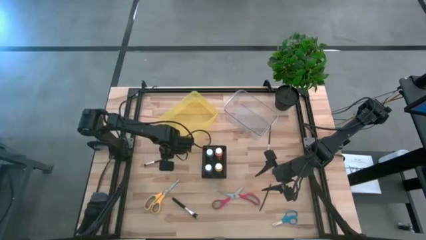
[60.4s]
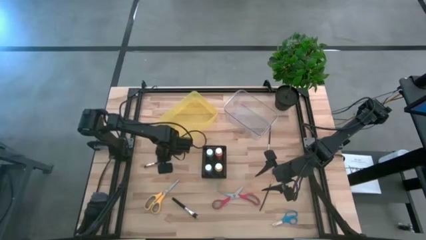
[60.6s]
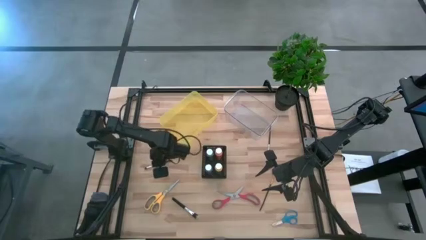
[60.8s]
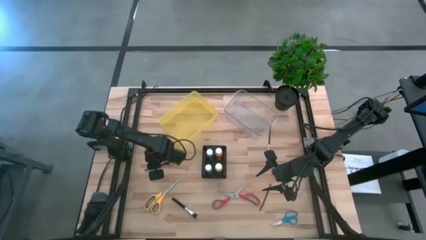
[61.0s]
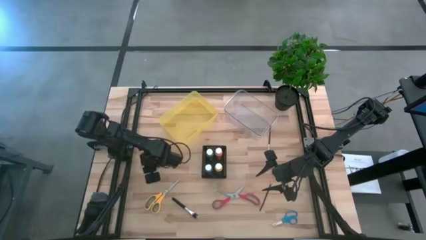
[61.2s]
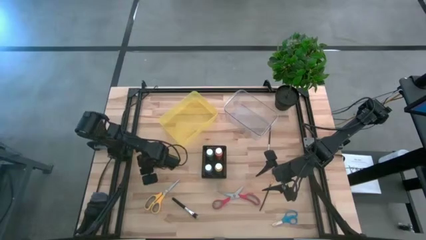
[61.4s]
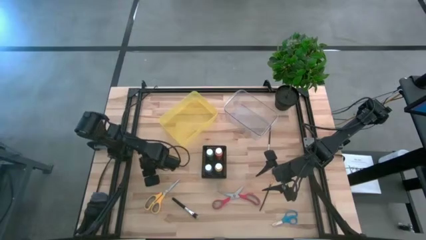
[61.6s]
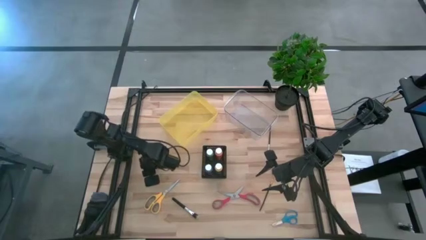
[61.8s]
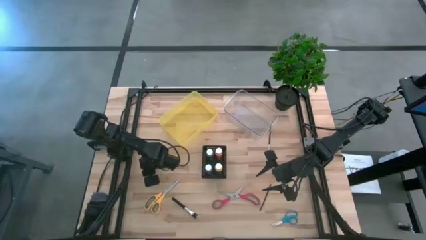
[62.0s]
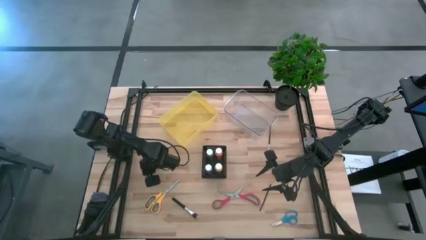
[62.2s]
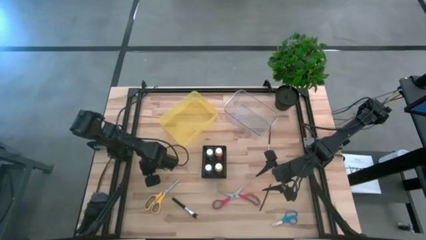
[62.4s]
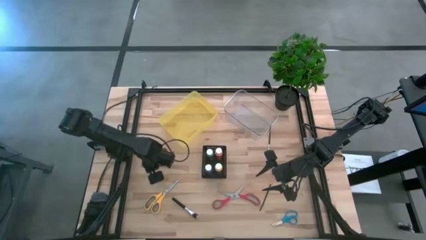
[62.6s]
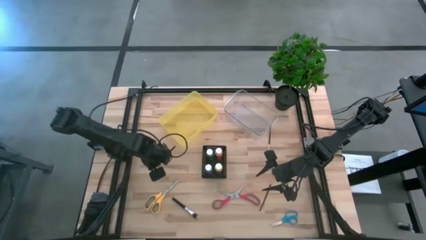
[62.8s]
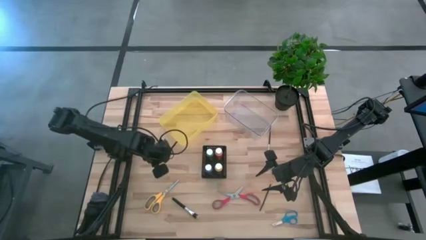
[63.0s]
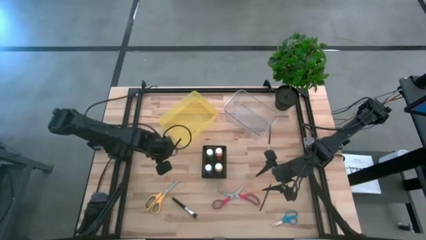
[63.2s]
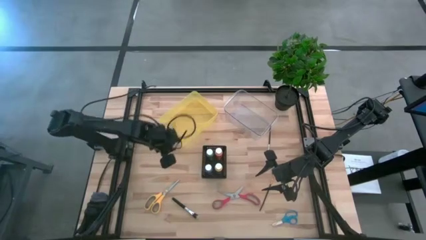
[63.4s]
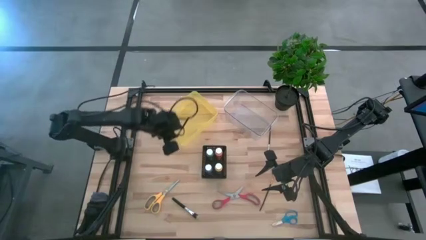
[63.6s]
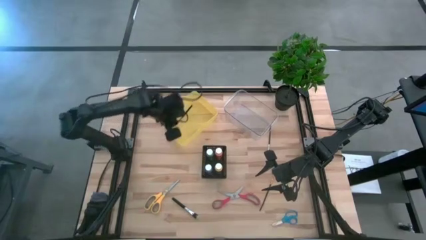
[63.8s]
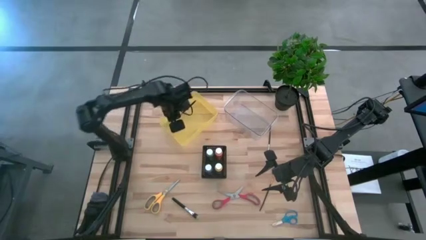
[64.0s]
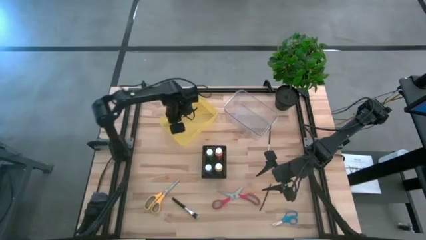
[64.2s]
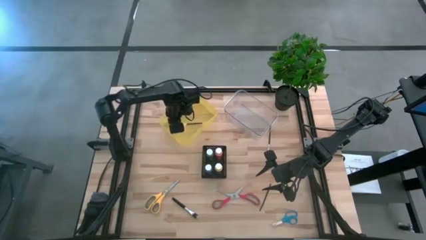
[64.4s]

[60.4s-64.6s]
Task: Pick & Place Paint Supplies
Put the left black eyeshadow brush into the yellow bin

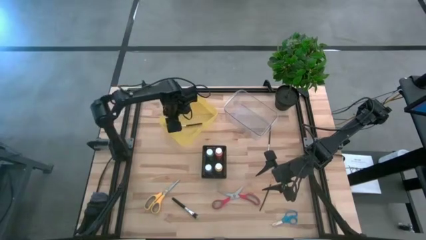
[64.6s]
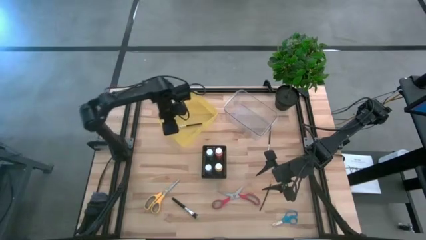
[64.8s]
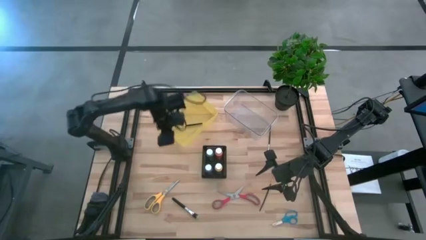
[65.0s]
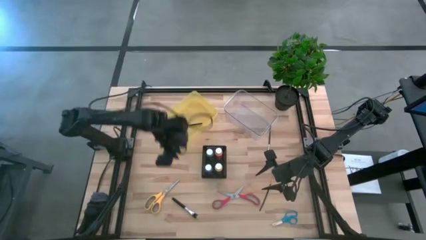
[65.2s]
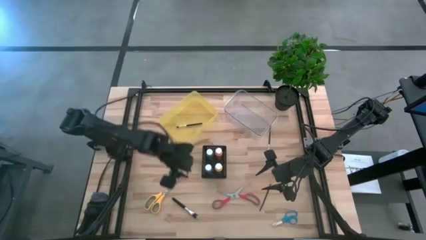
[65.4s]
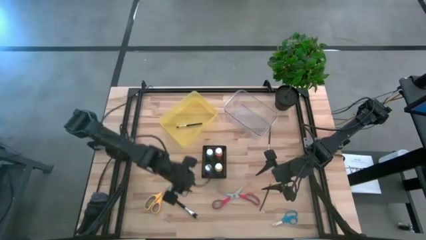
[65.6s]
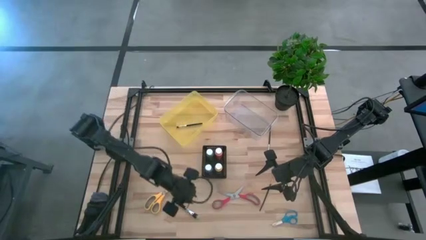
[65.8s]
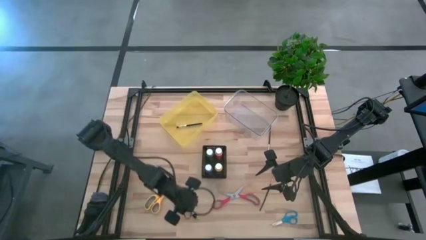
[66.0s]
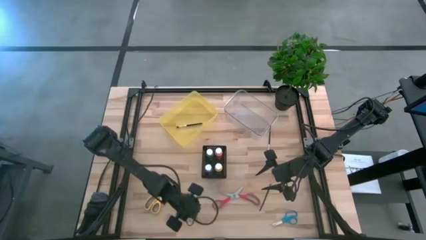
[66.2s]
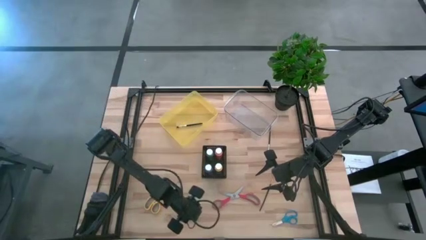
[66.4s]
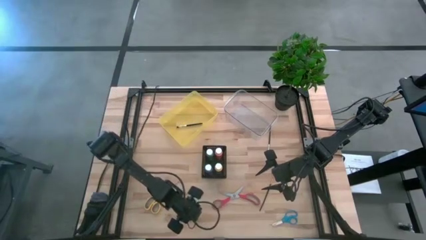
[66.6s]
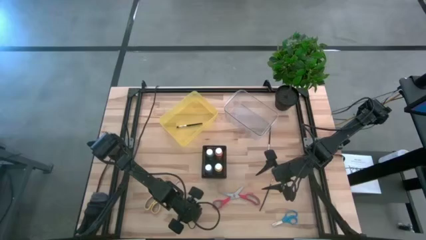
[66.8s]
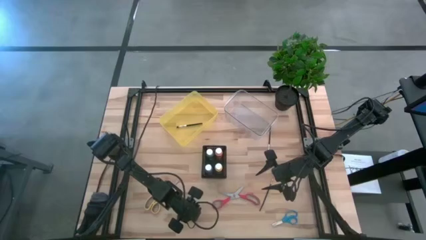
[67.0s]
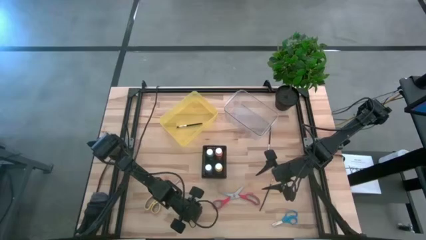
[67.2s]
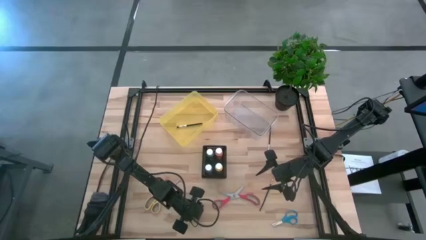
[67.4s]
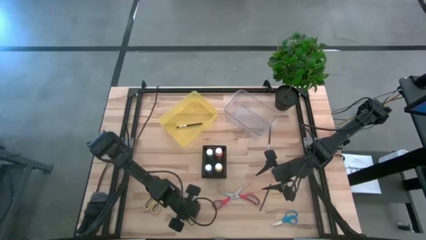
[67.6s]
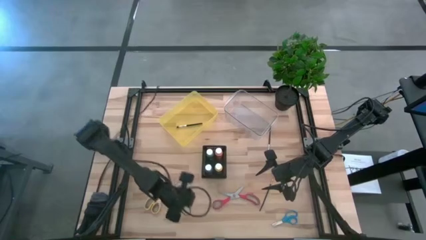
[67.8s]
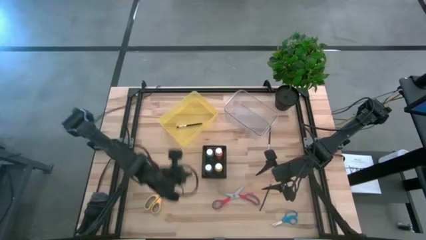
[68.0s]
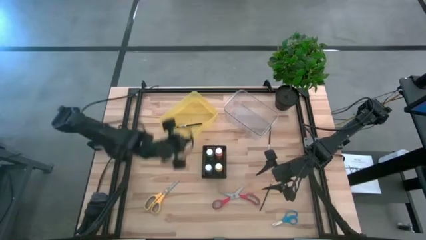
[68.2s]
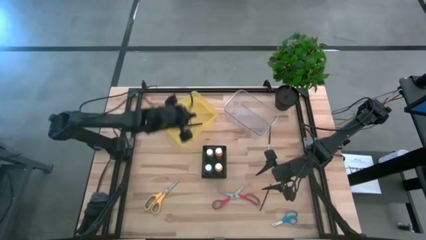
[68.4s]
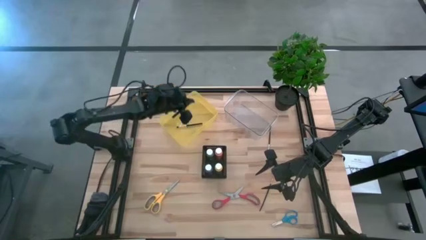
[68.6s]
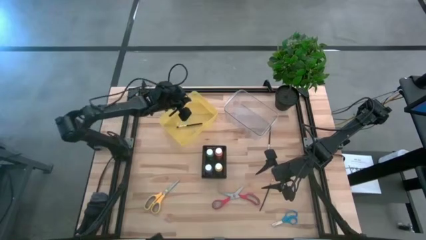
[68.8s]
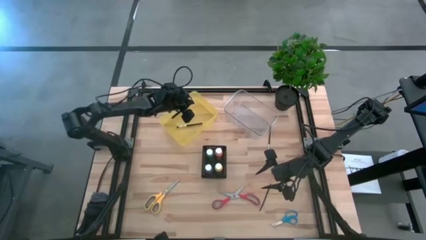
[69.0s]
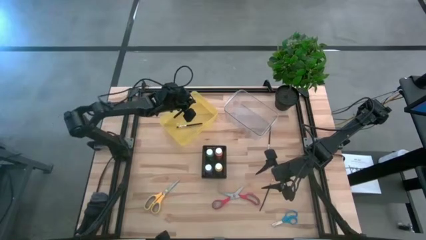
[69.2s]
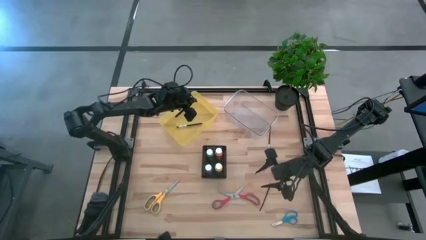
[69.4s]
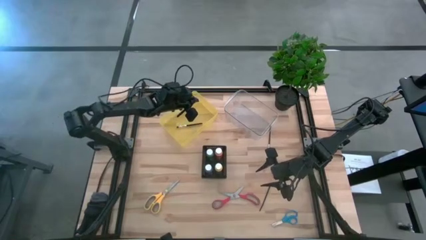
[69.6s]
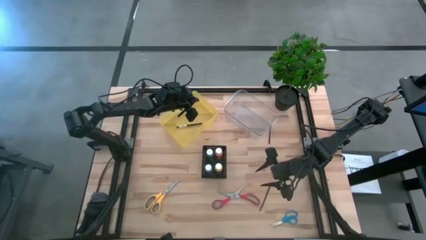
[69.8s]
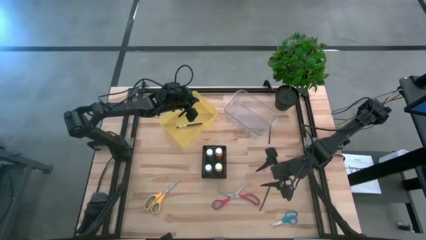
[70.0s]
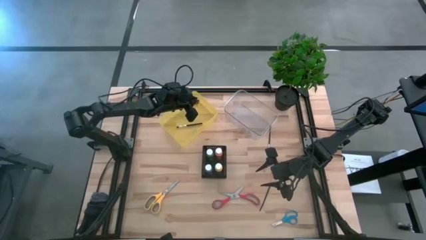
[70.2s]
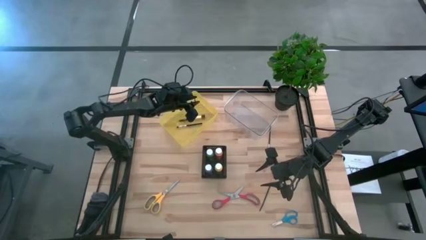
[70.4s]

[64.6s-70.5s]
Put the black powder brush into the yellow bin

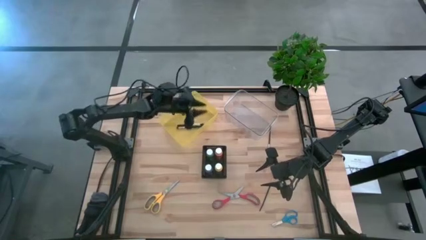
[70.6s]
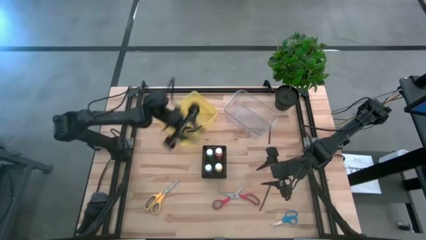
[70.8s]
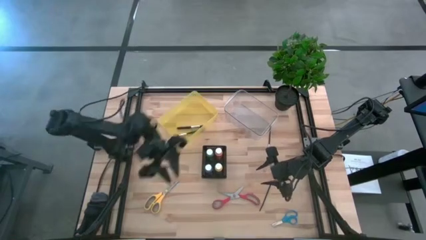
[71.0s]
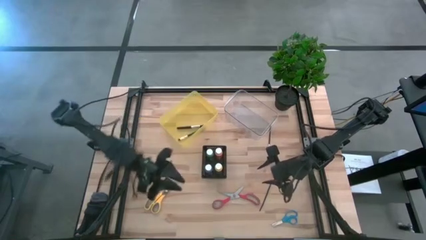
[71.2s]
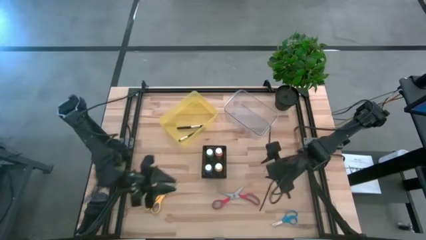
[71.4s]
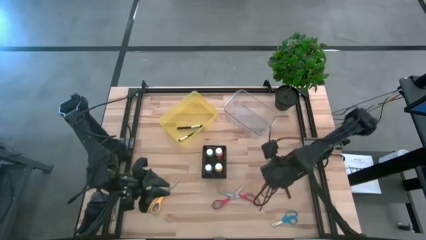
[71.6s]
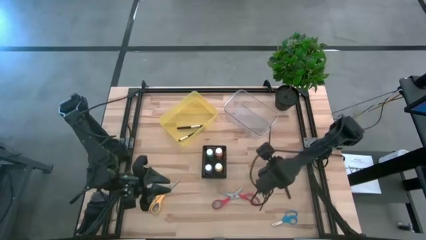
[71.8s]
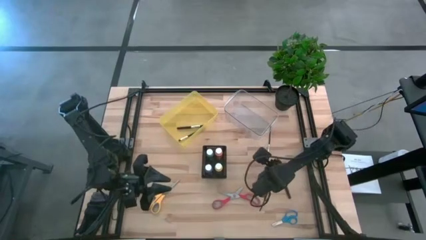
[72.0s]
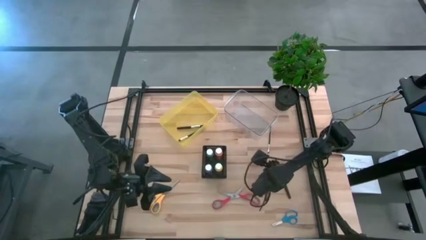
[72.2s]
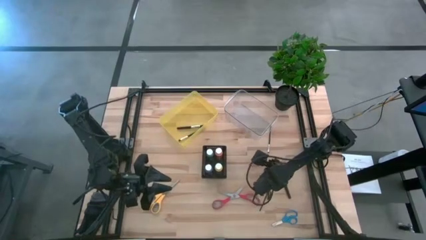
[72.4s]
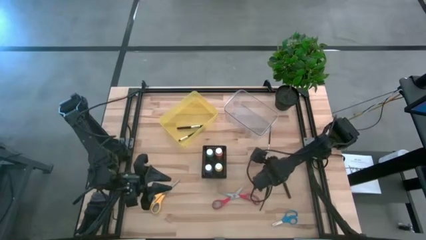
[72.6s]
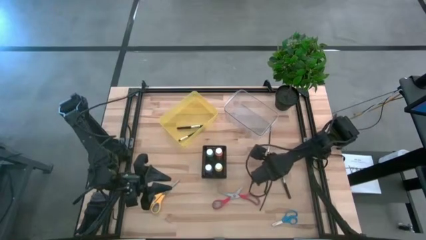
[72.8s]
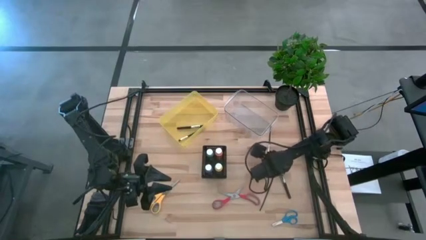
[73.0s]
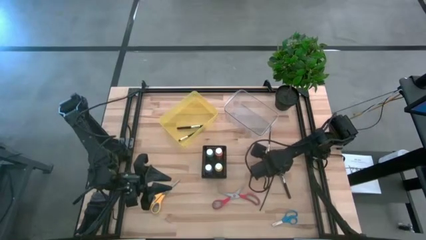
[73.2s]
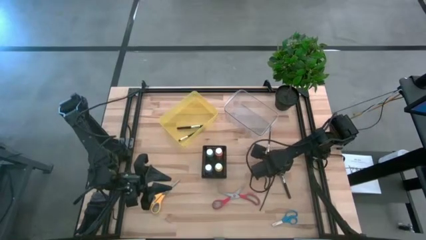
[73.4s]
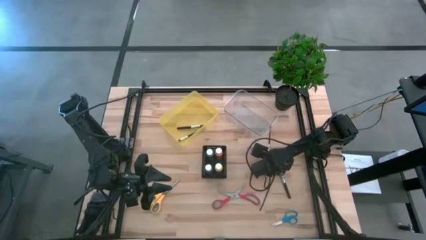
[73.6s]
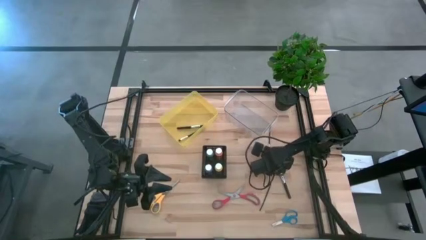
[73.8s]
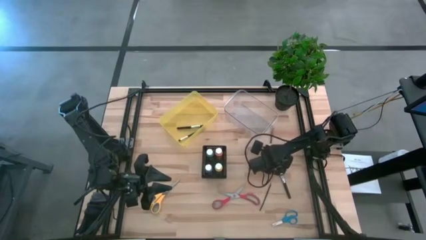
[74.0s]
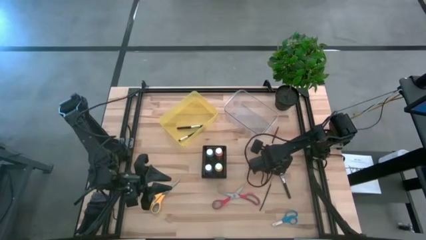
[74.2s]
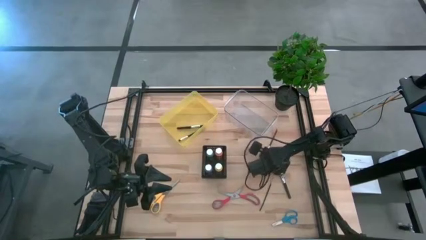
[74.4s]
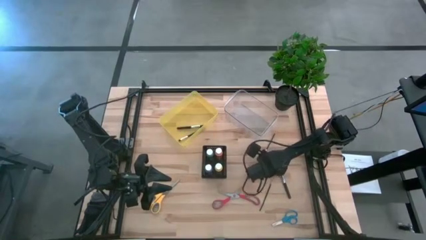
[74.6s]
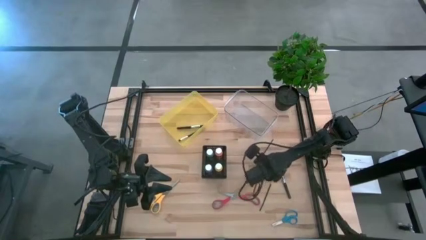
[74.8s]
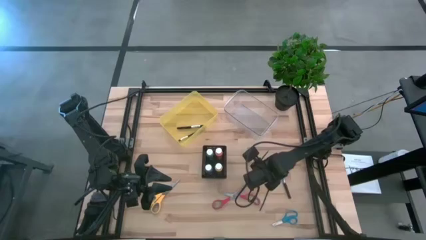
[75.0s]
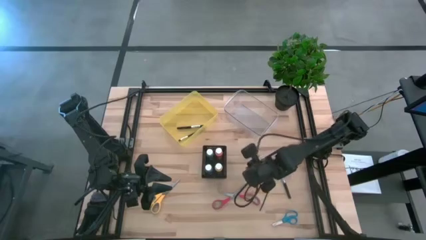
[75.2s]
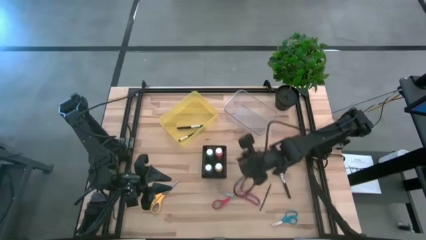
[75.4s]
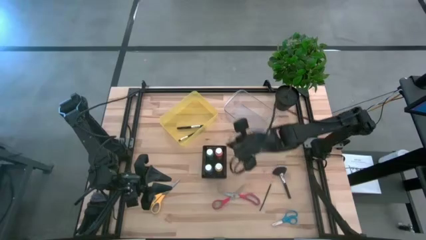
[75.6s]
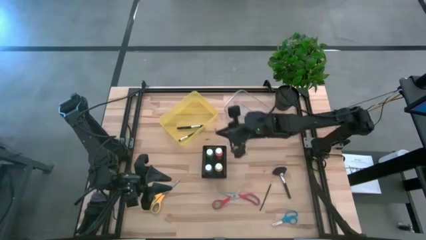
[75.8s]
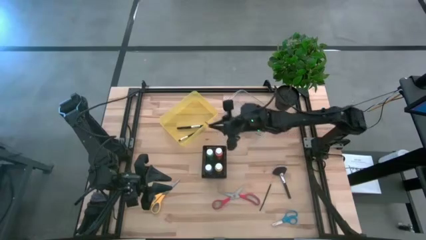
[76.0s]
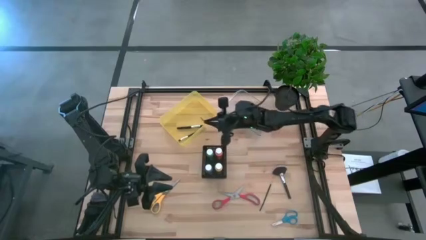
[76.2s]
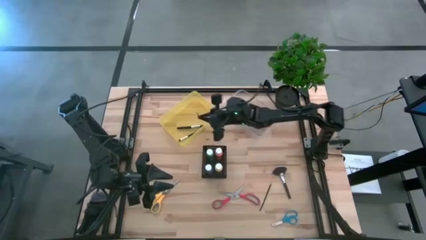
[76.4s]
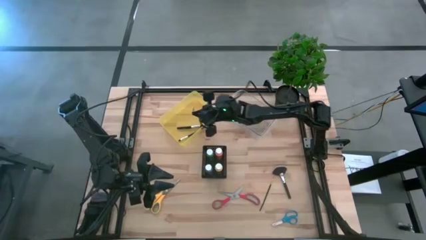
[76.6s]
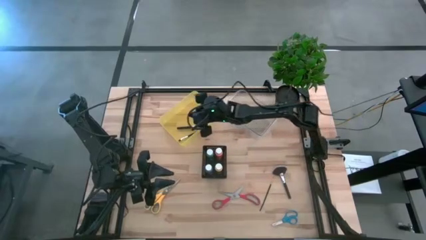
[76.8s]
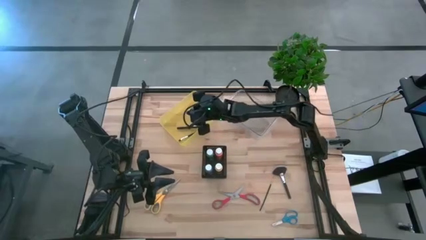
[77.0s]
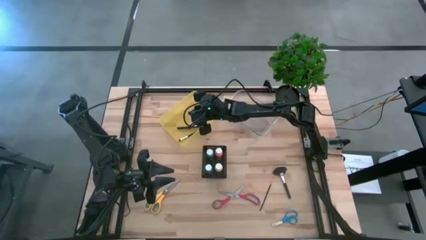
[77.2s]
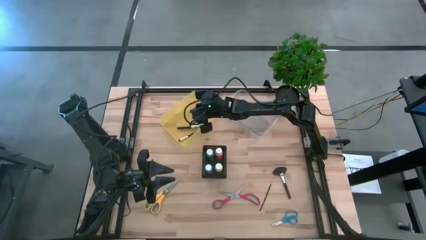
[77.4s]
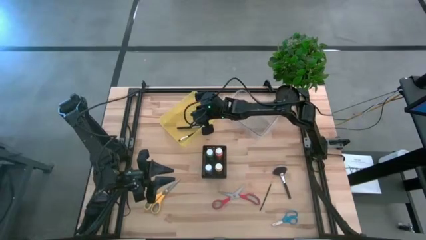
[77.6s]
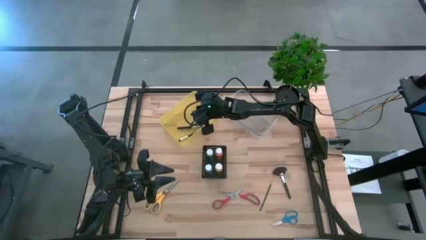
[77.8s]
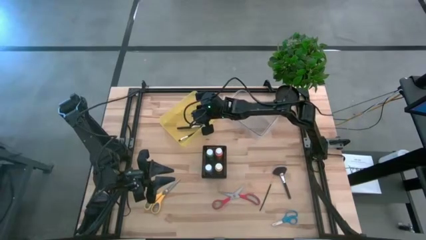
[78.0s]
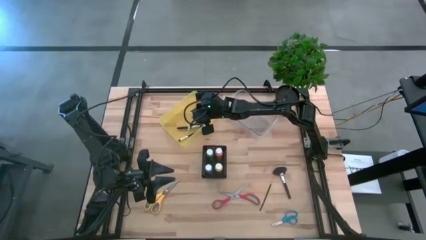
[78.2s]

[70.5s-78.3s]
Put the black eyeshadow brush into the yellow bin
